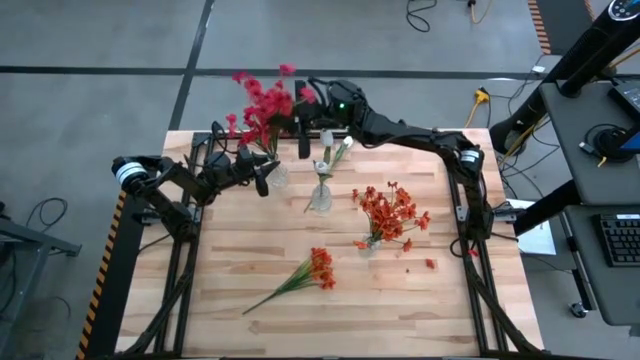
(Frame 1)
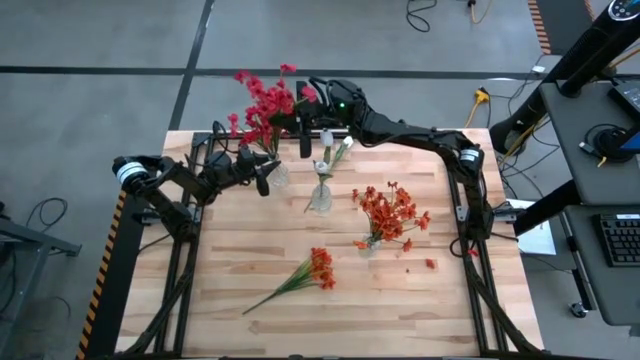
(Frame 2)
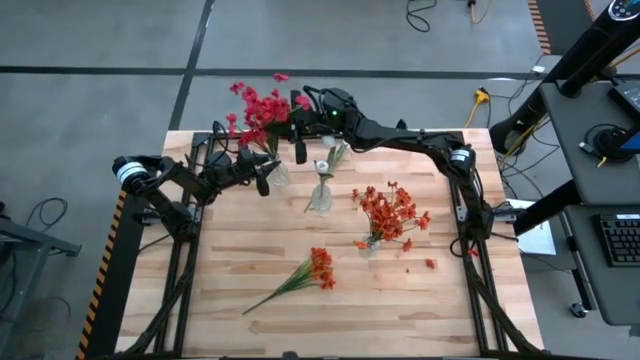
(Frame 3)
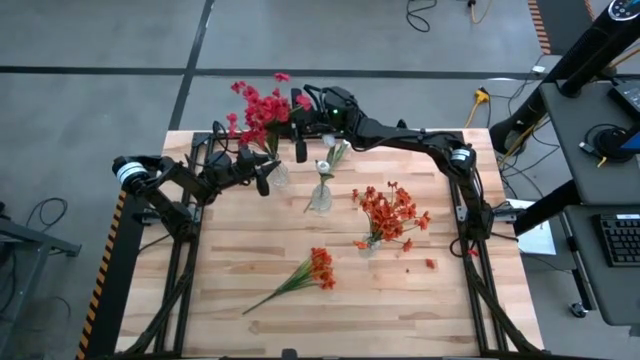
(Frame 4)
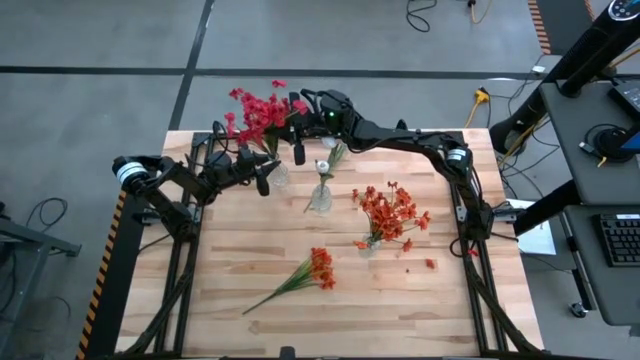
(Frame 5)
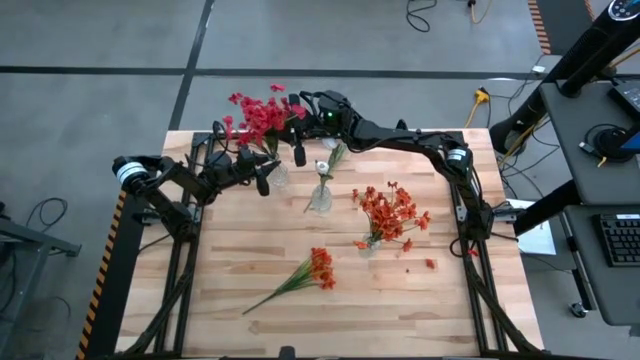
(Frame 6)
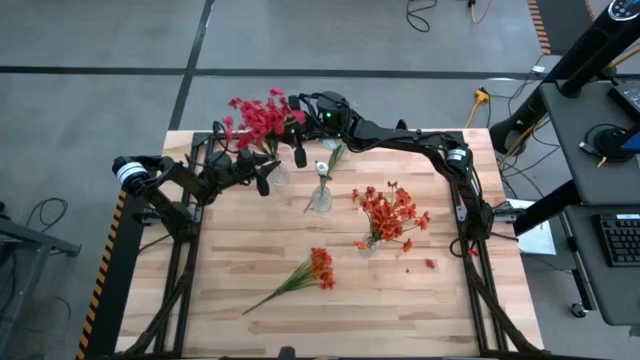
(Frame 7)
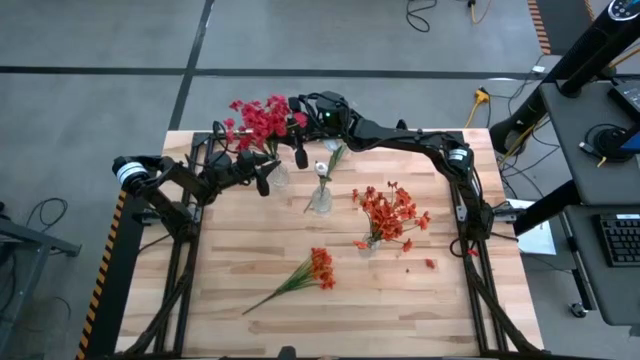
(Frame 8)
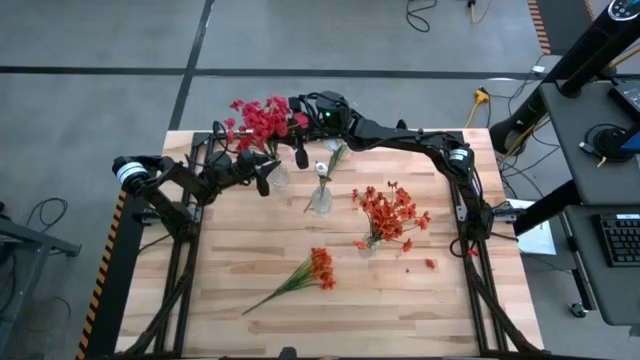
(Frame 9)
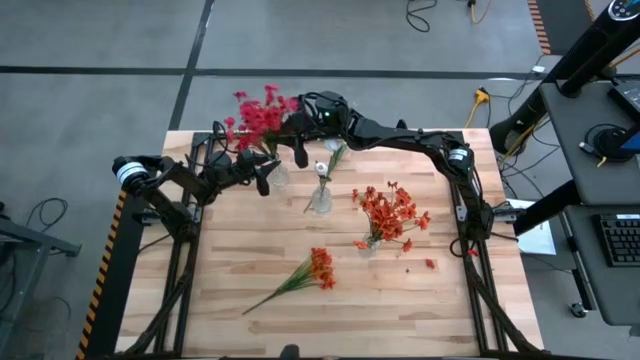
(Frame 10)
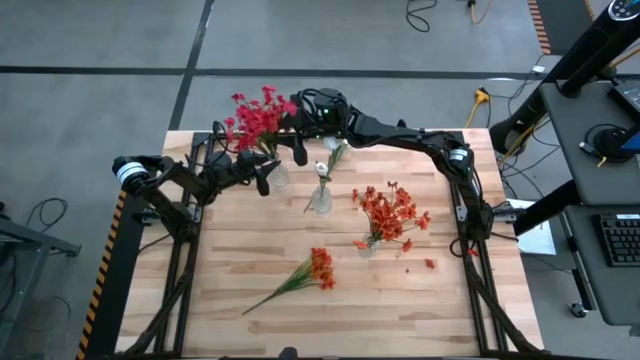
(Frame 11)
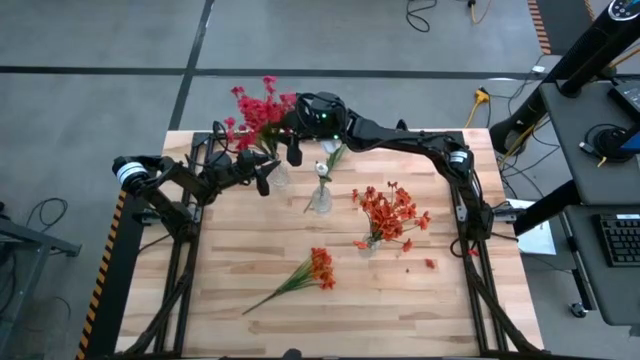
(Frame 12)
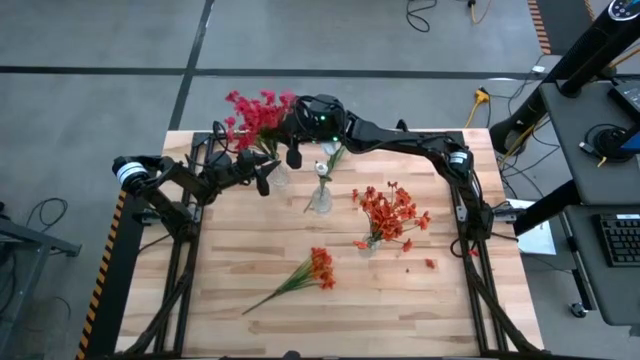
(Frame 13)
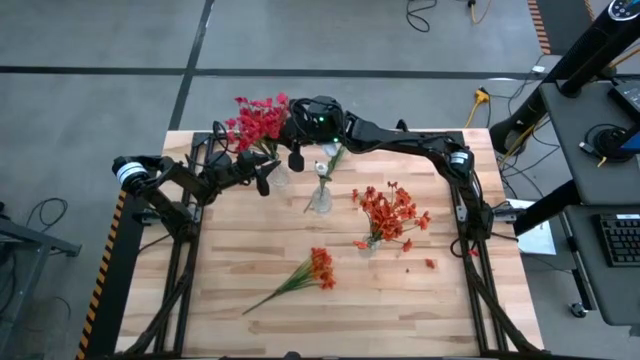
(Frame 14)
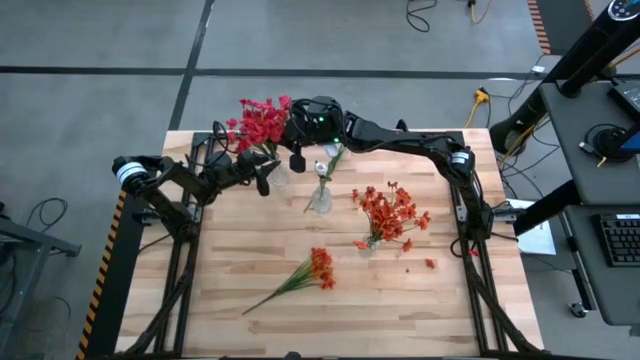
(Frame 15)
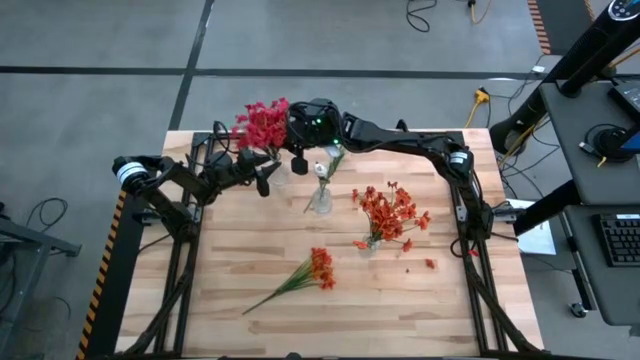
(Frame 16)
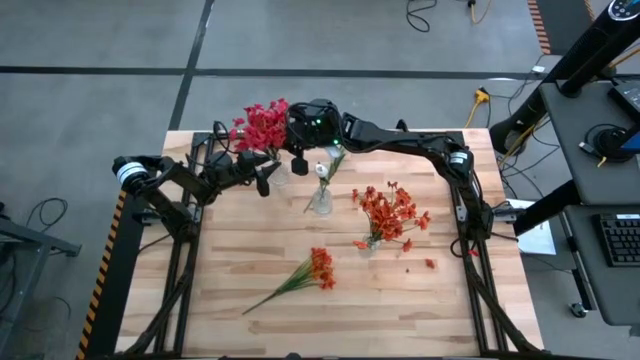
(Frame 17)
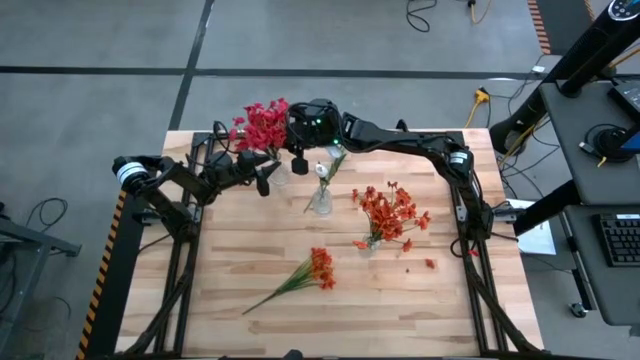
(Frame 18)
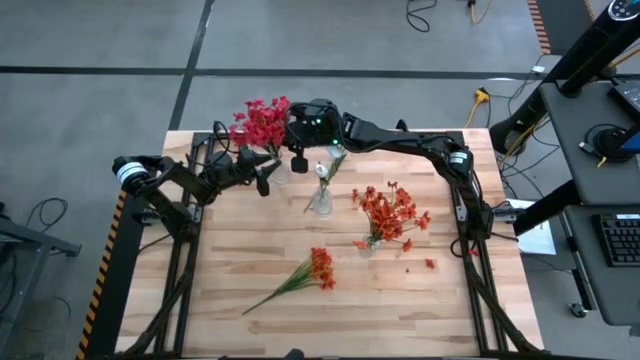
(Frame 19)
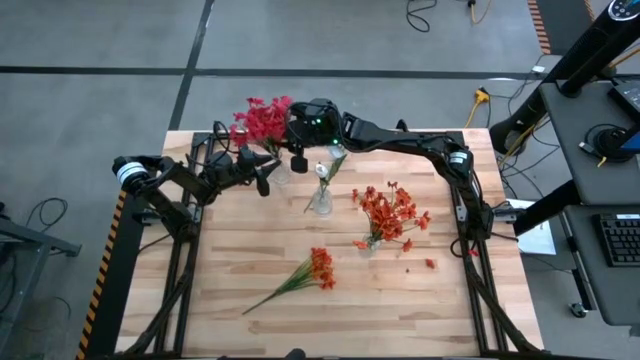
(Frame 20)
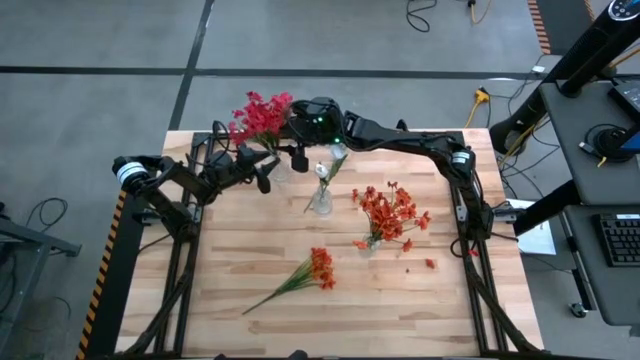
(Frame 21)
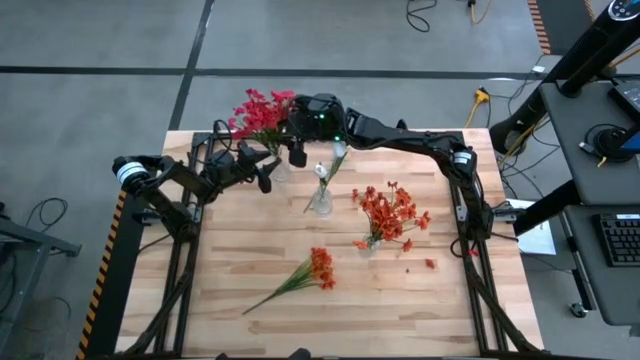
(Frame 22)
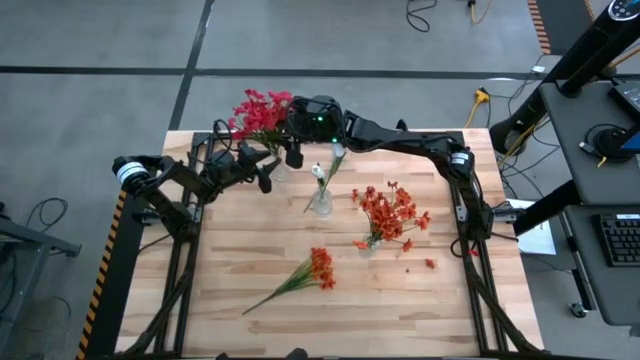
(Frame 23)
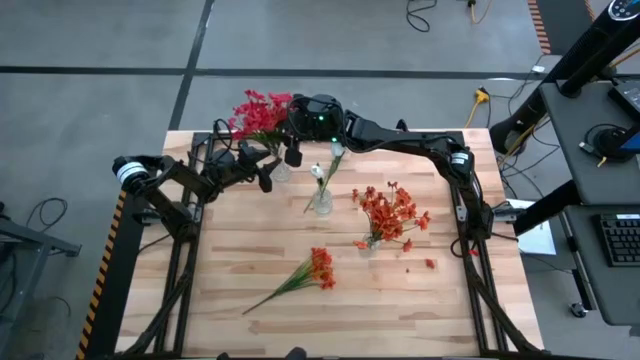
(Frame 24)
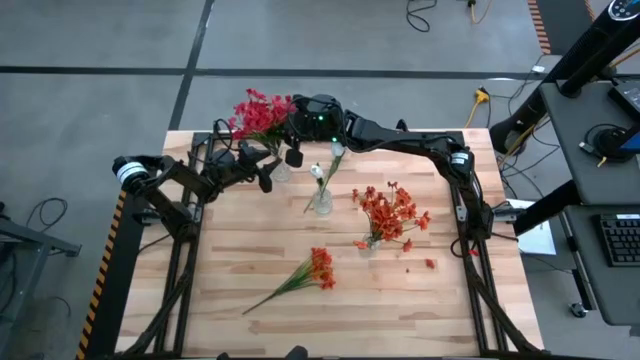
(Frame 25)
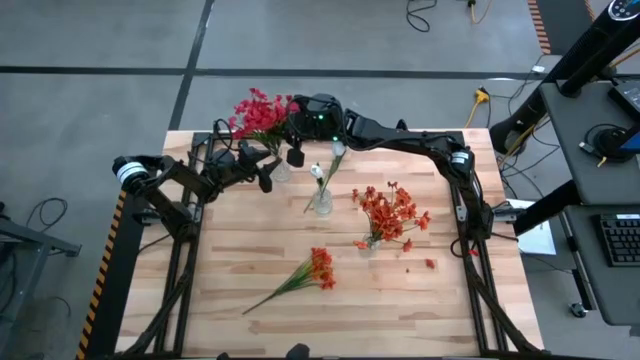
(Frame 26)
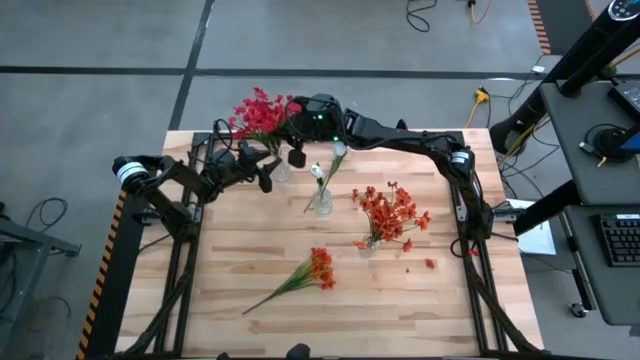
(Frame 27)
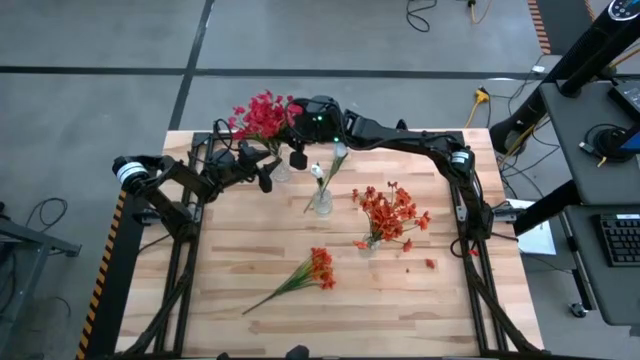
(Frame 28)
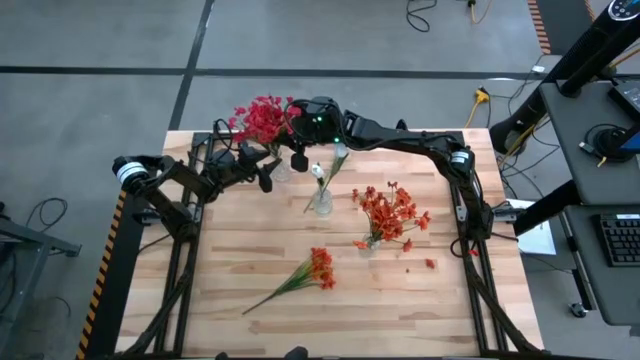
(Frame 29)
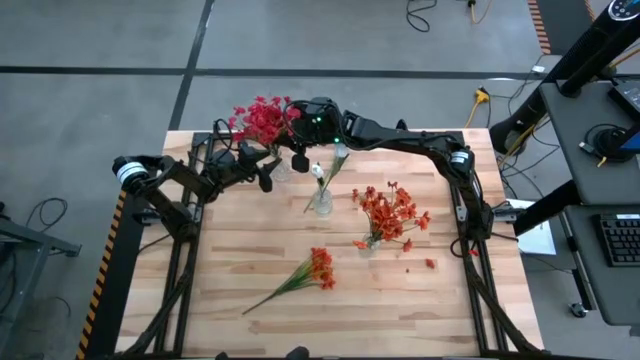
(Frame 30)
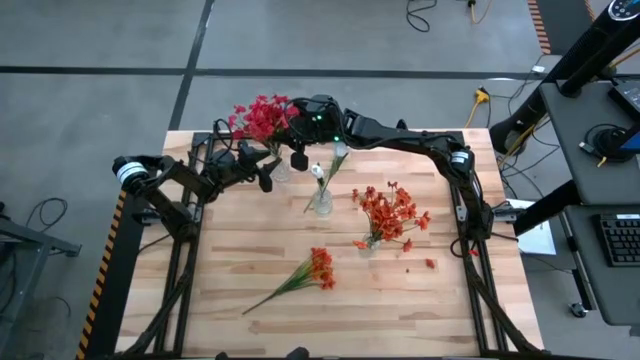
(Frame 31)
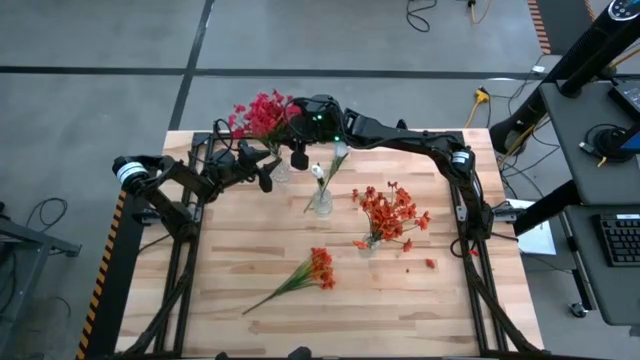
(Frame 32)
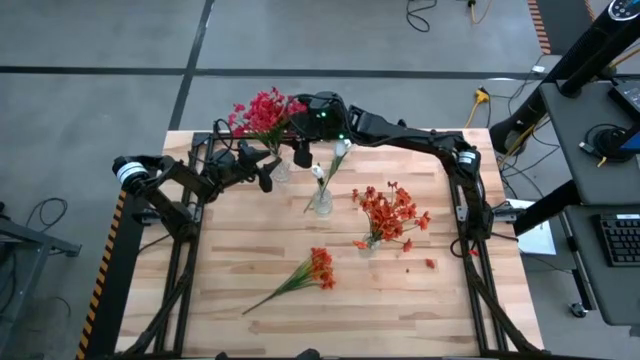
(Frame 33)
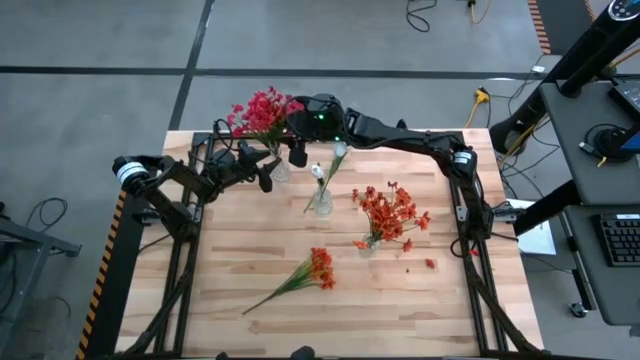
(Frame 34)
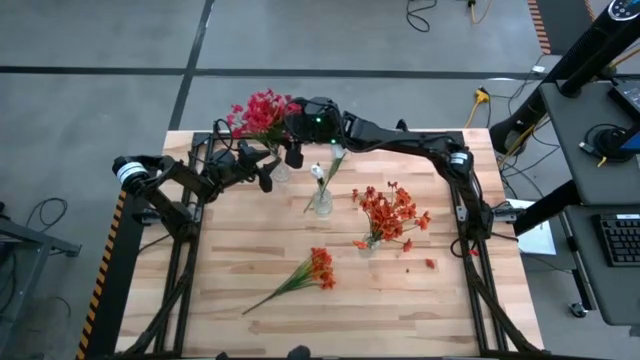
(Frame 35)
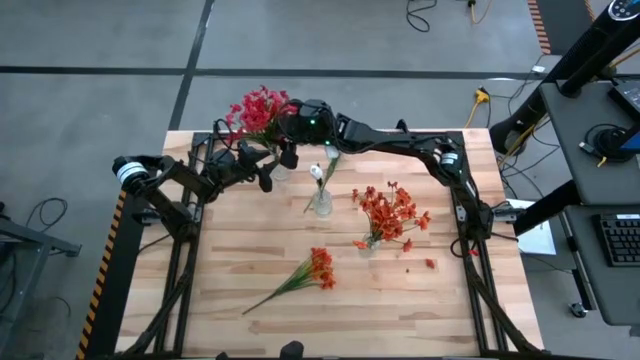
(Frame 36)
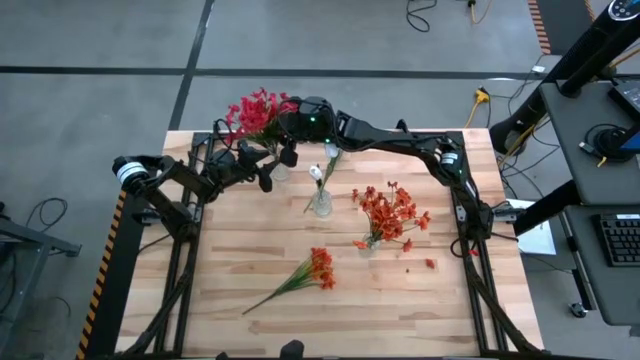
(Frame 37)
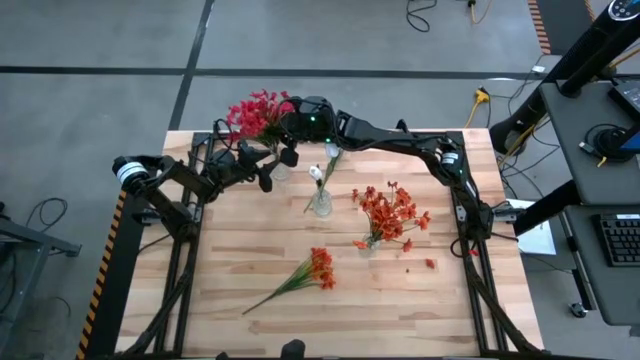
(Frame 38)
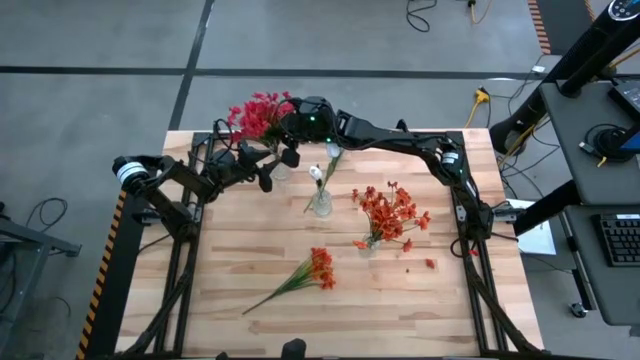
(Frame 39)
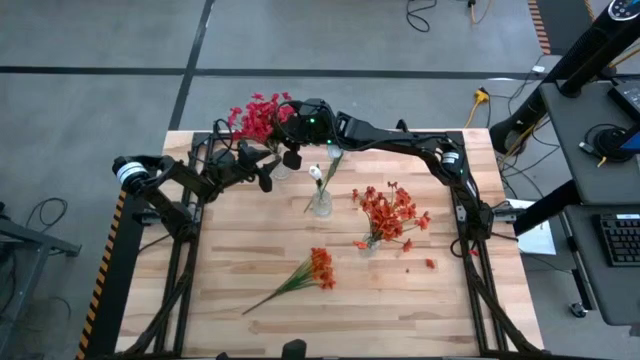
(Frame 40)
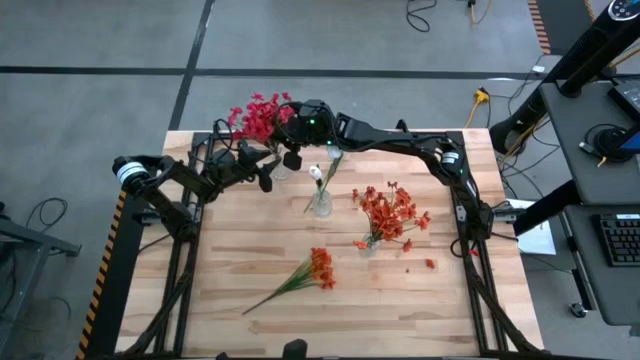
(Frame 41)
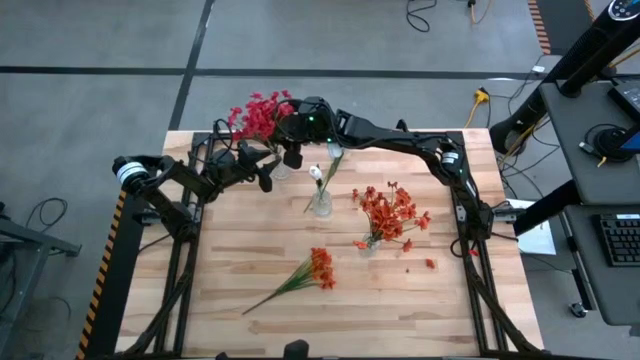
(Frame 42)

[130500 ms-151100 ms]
Task: Sort flowers into vase by color
Put the top center red sprig flower into the top left transparent glass vase

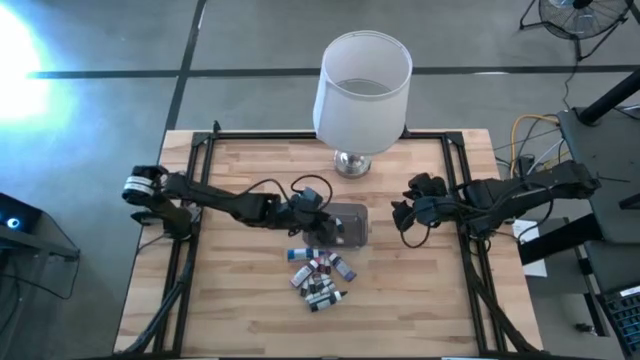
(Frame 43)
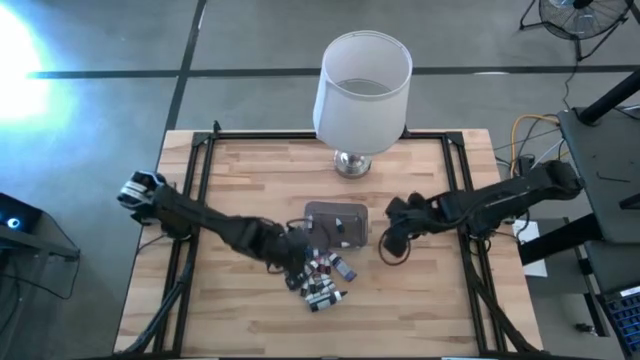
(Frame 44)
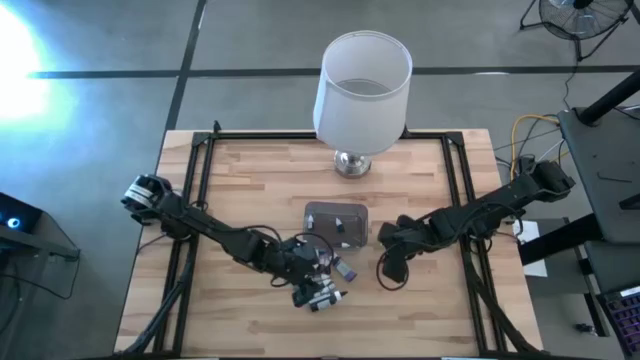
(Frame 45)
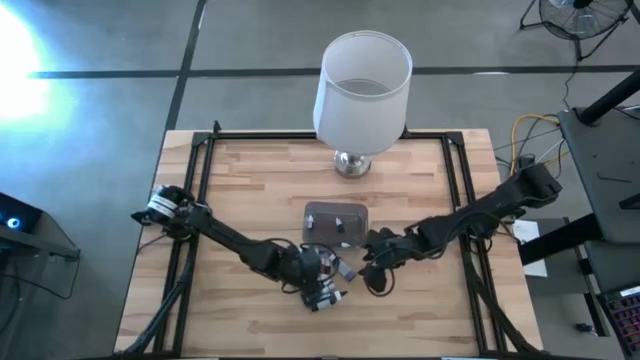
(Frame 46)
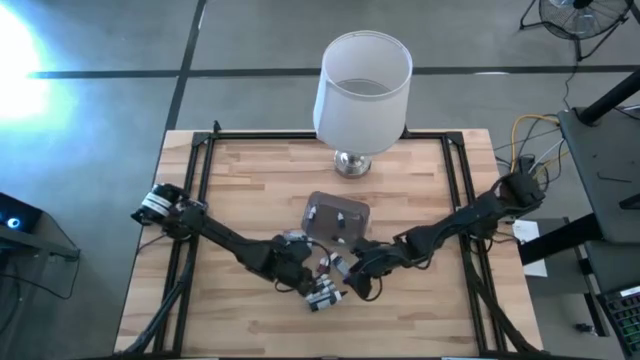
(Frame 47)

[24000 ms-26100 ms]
Task: Pick & Place food coloring
Adjust the big food colorings on the table
